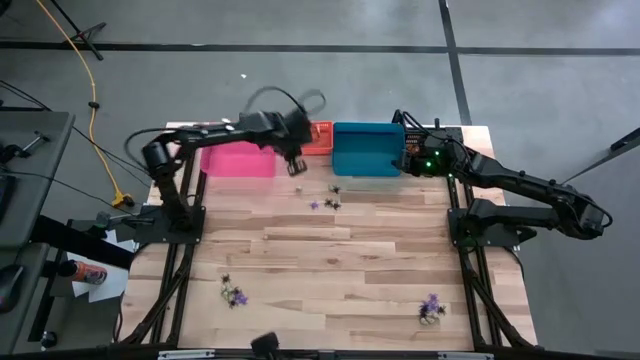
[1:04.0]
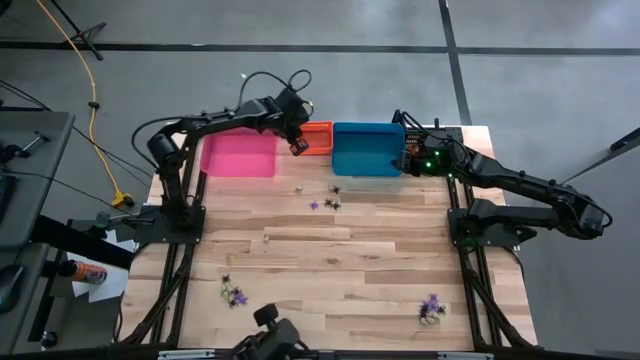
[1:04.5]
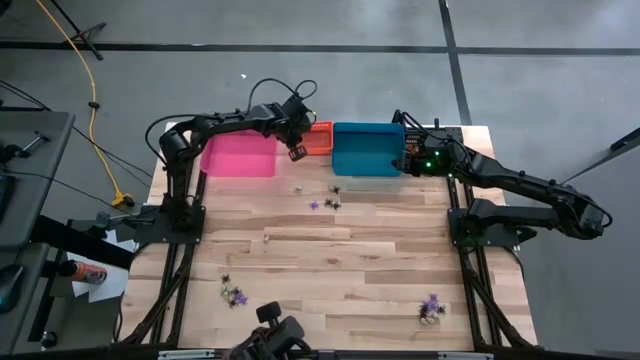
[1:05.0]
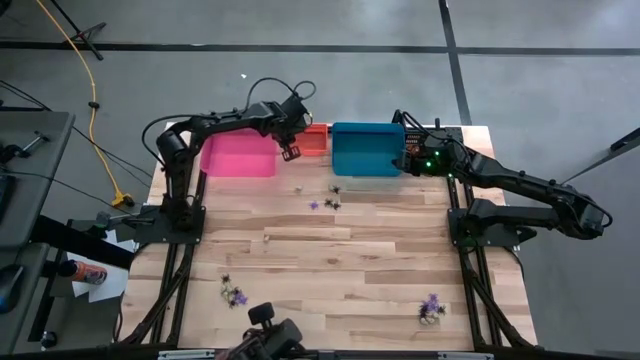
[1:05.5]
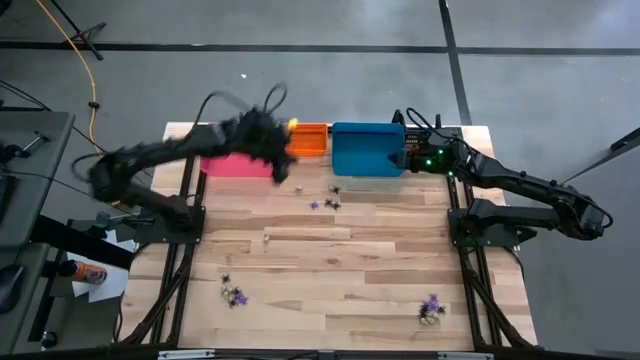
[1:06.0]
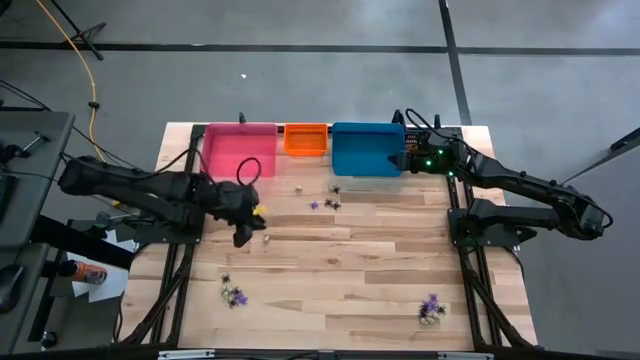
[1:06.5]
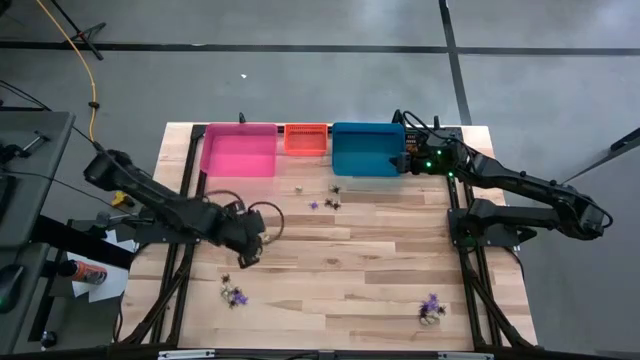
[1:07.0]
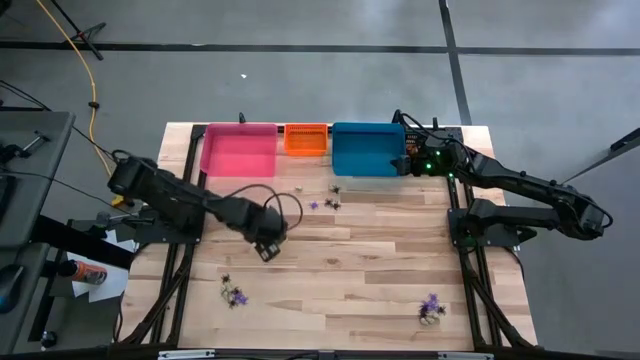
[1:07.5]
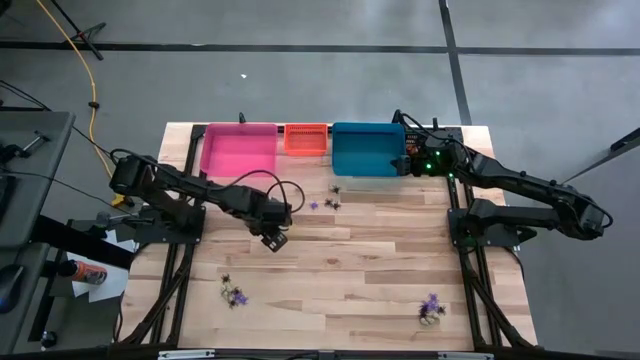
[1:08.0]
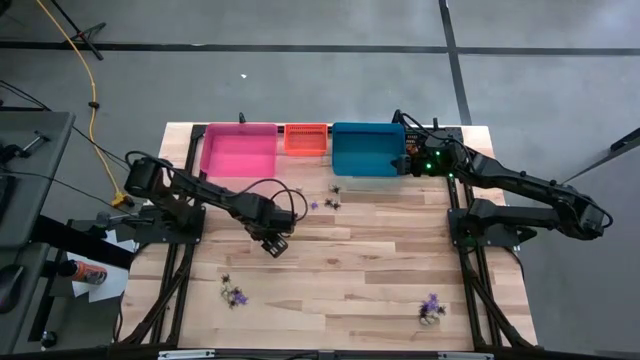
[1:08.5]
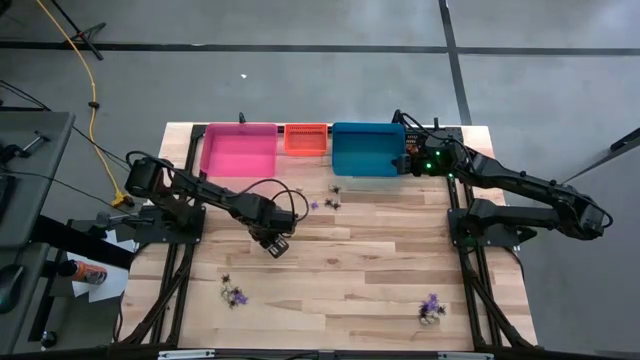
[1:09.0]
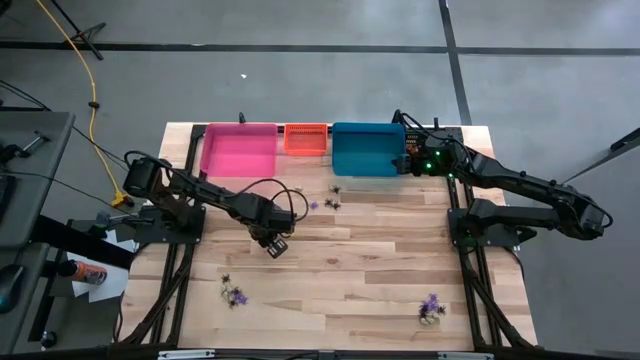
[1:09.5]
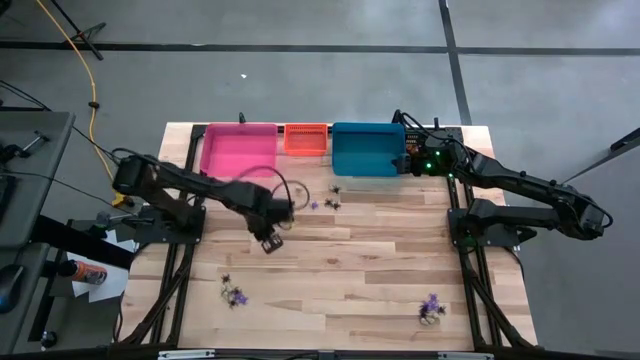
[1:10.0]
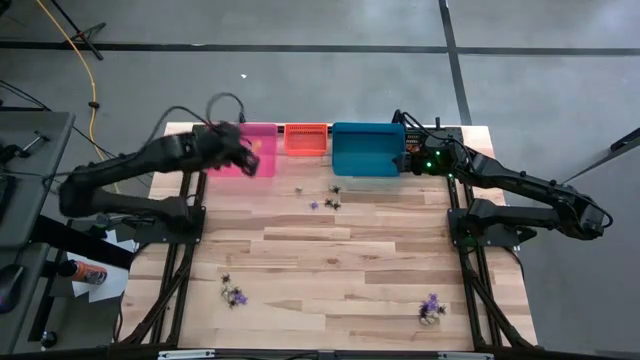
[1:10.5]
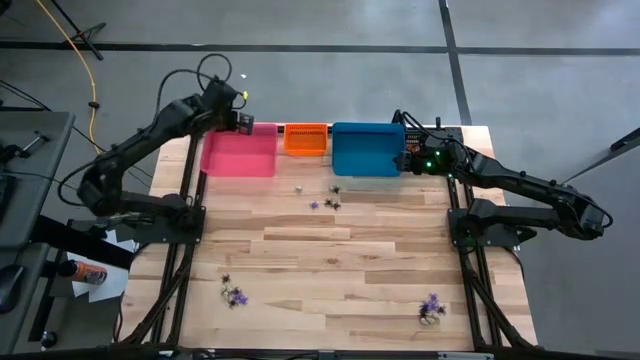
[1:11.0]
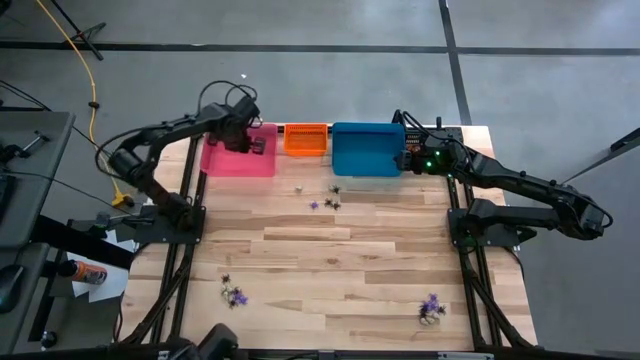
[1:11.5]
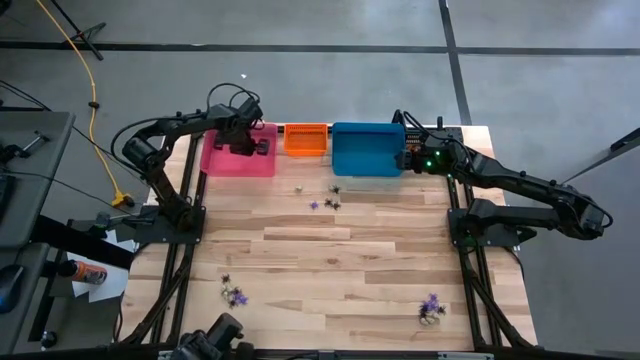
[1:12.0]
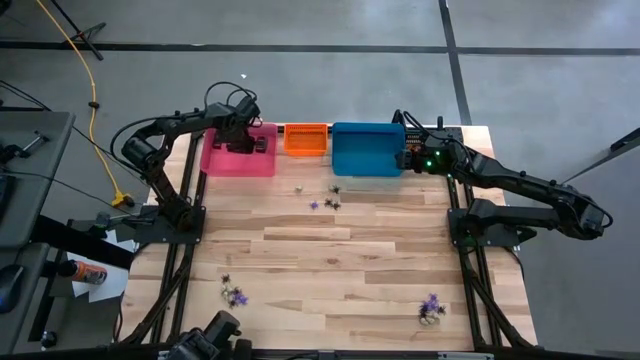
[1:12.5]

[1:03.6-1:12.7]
Task: Sort Halloween decoration
Put the white skull toy into the pink bin

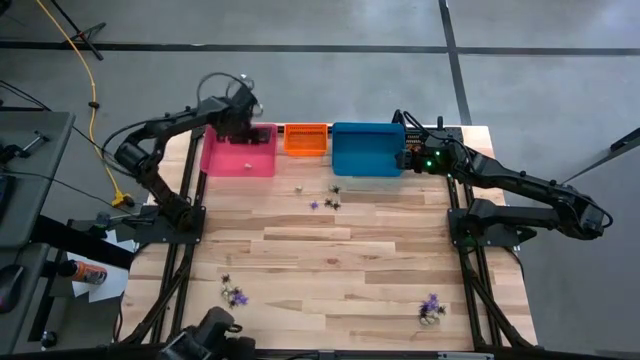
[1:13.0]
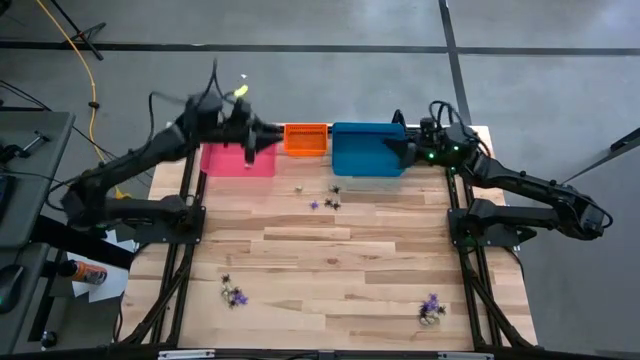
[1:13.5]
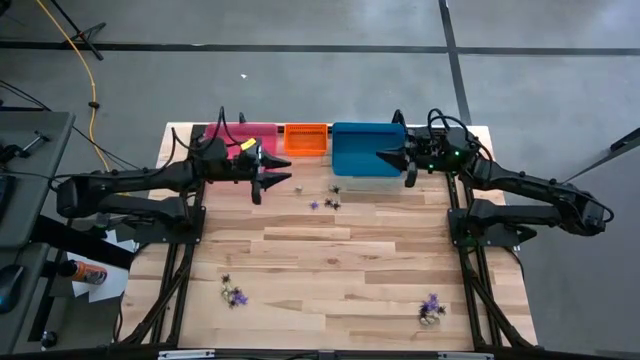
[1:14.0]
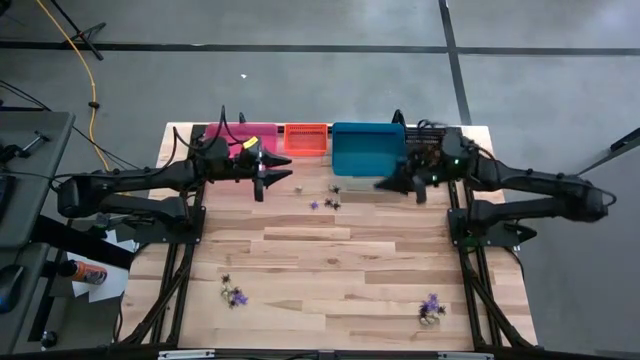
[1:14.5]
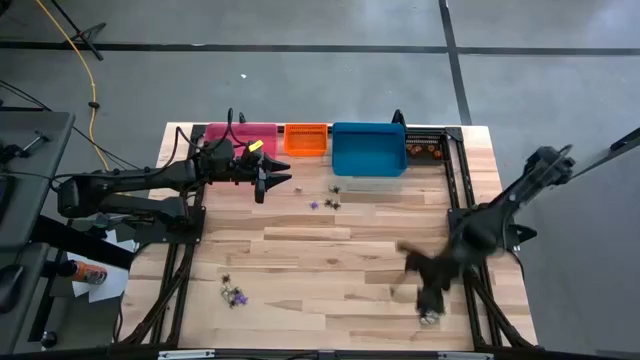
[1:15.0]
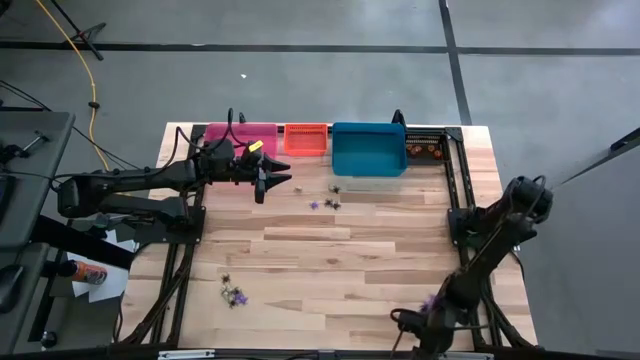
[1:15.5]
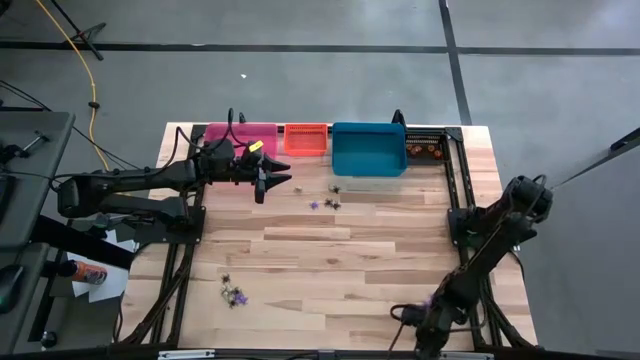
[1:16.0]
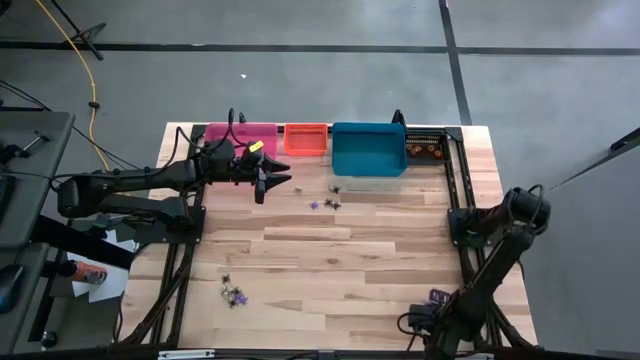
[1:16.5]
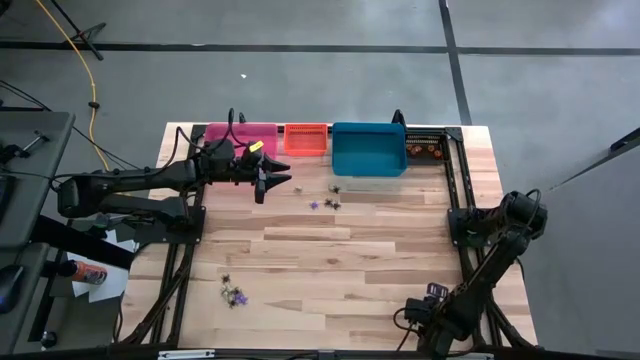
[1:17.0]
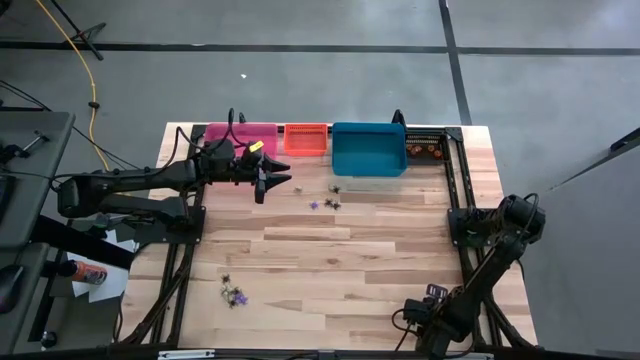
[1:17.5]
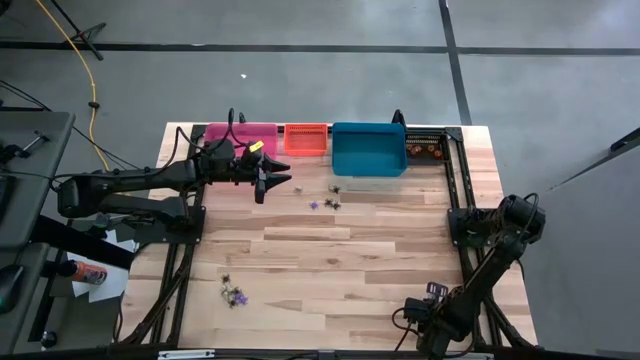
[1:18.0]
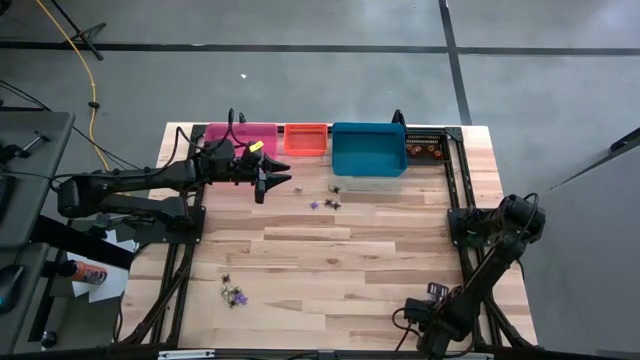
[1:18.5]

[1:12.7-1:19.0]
Put the white skull toy into the pink bin

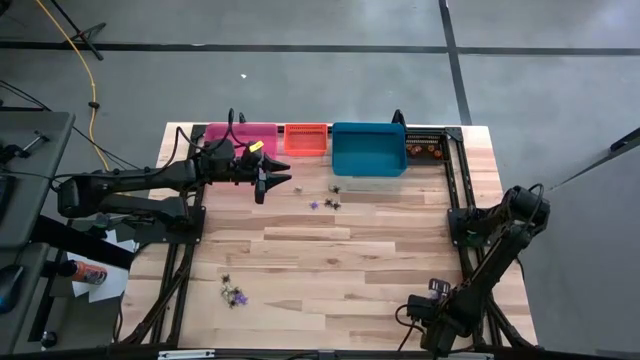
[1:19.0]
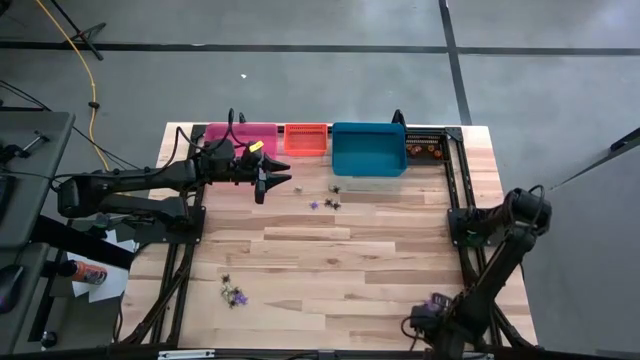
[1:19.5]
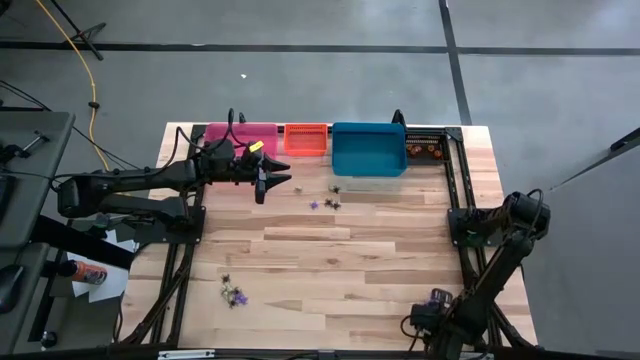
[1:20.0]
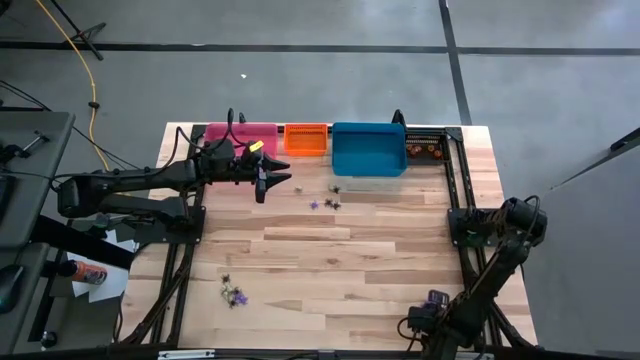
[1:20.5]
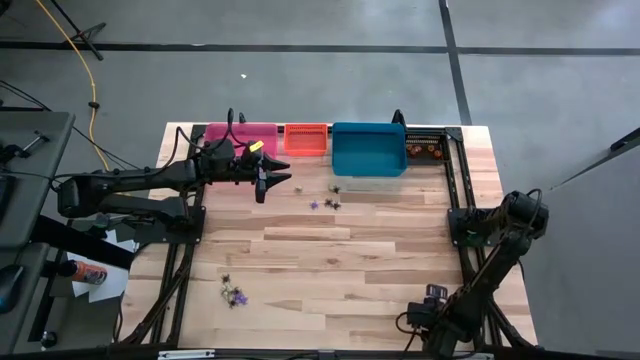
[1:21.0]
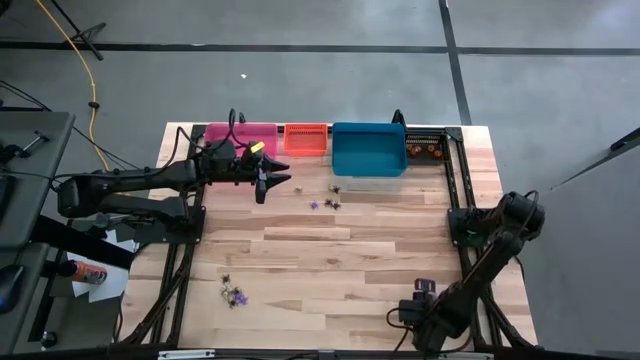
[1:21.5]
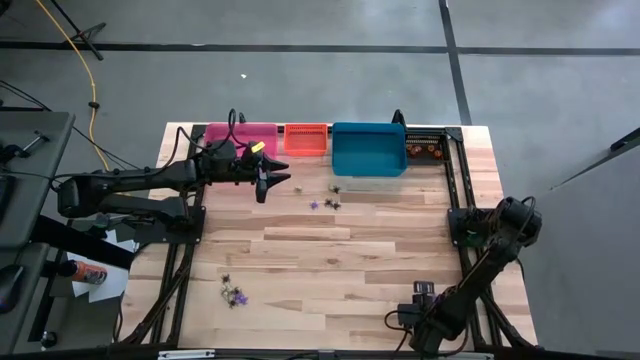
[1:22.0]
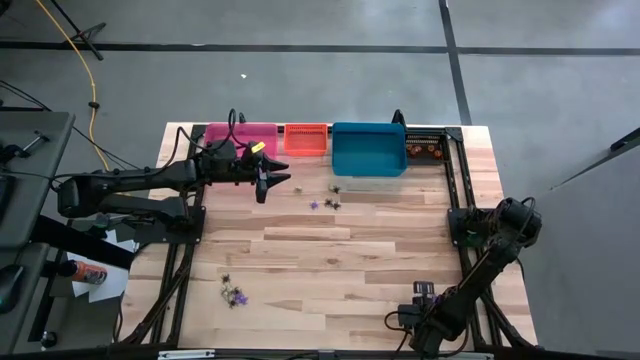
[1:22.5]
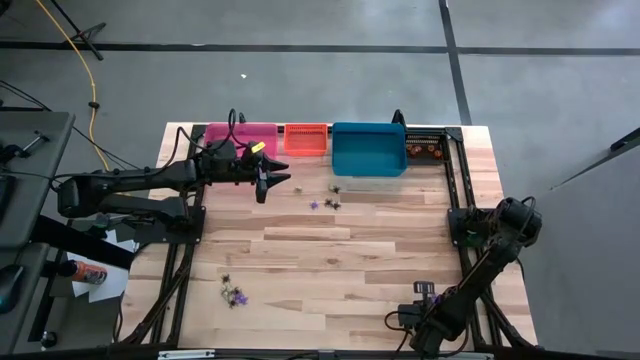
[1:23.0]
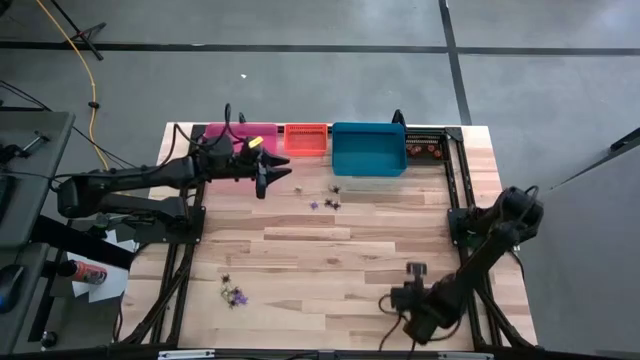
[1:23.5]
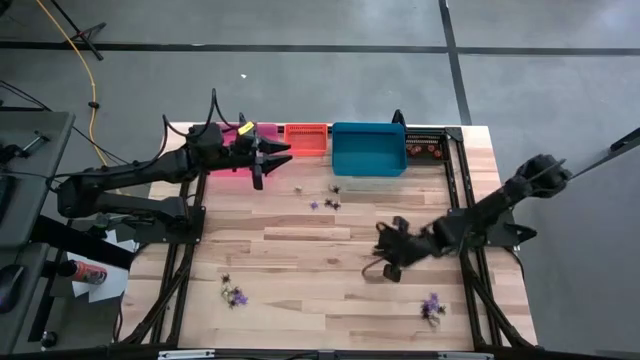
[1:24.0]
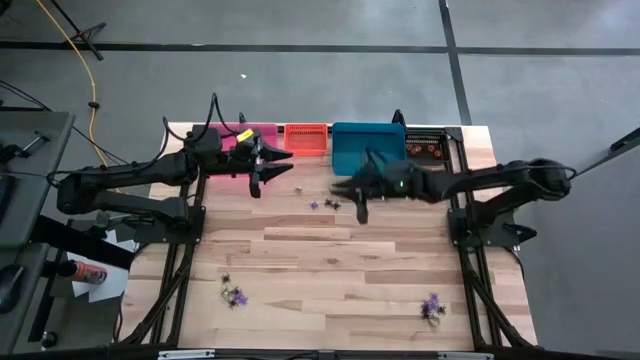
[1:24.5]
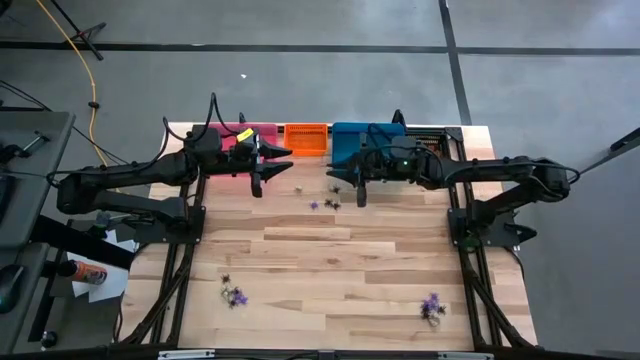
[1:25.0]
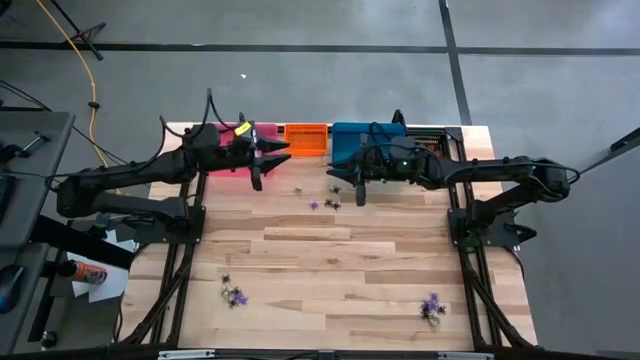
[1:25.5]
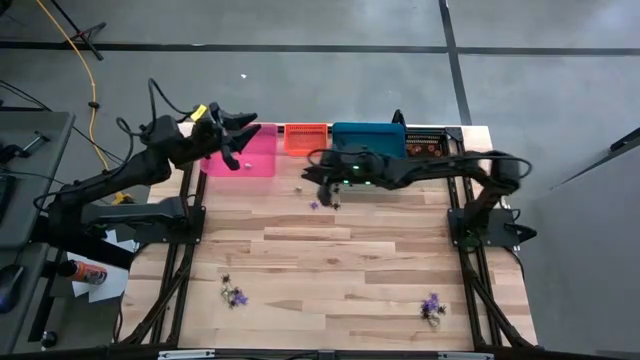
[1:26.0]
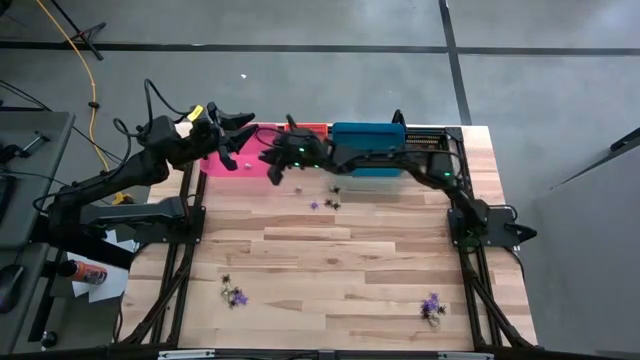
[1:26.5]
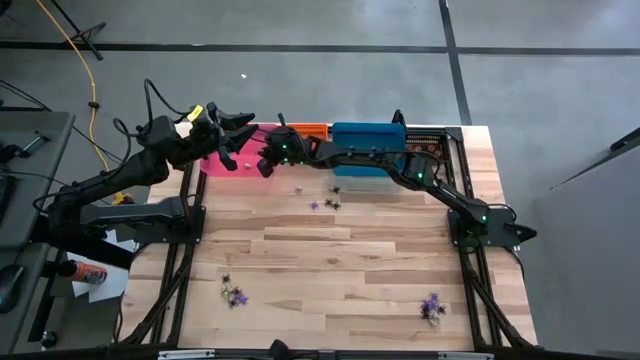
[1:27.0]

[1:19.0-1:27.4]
Put the white skull toy into the pink bin
